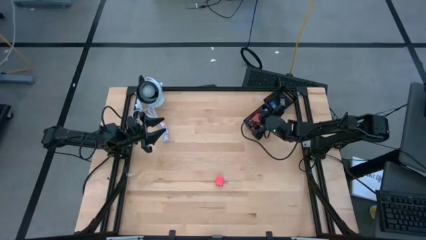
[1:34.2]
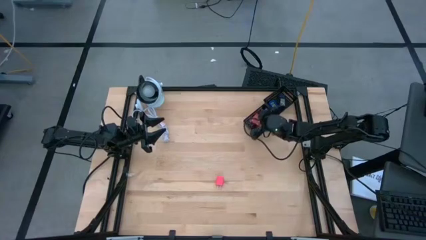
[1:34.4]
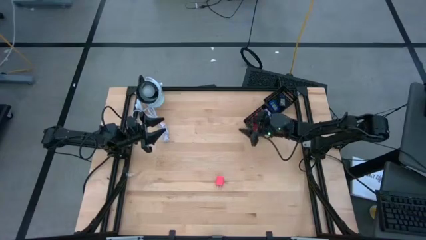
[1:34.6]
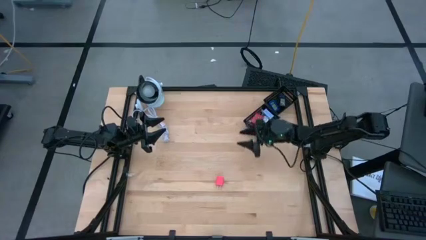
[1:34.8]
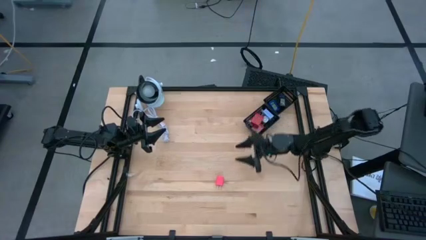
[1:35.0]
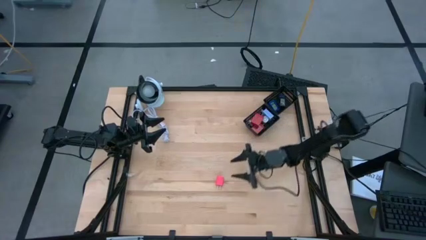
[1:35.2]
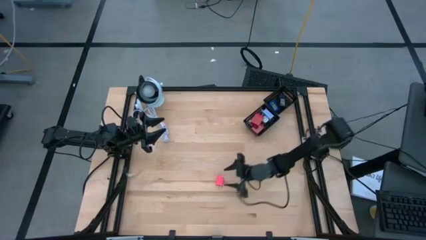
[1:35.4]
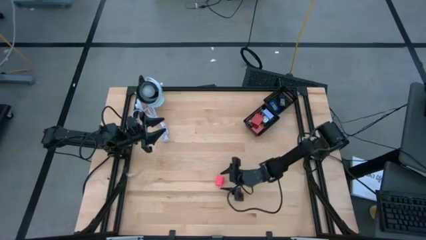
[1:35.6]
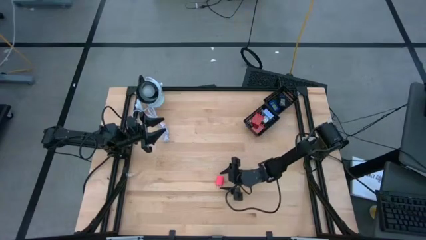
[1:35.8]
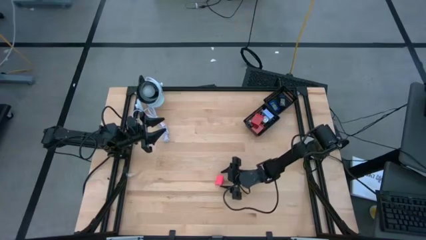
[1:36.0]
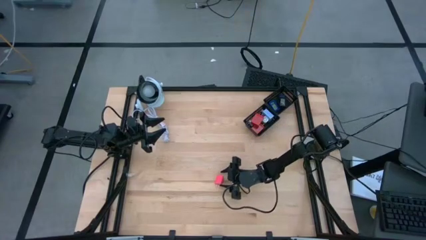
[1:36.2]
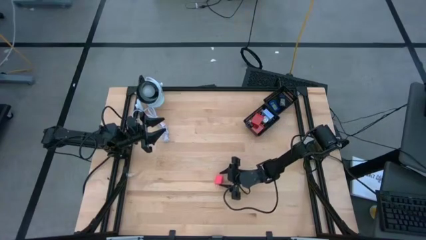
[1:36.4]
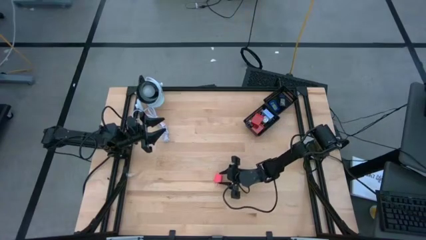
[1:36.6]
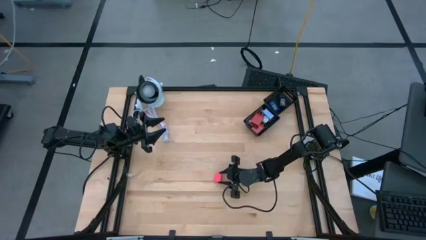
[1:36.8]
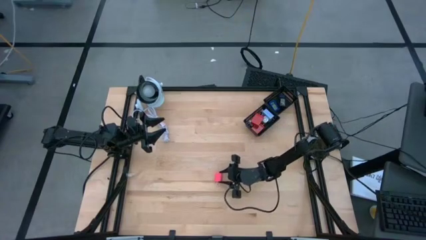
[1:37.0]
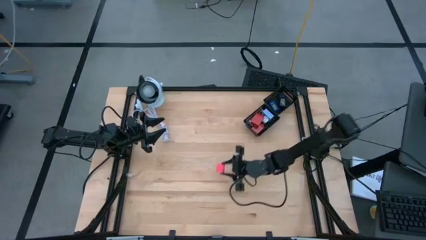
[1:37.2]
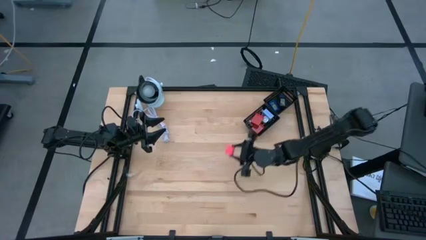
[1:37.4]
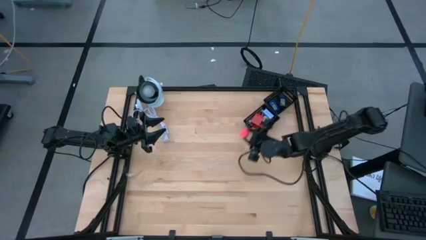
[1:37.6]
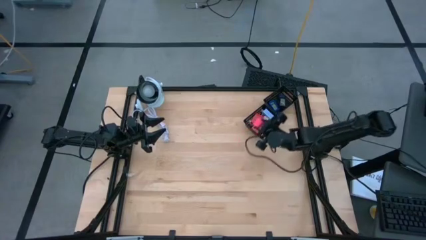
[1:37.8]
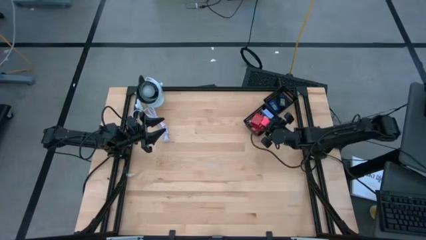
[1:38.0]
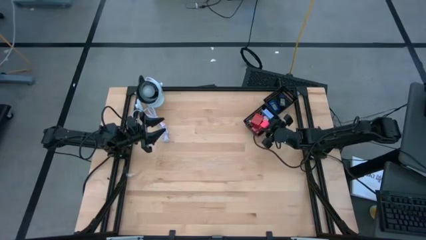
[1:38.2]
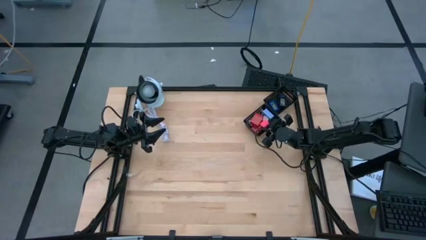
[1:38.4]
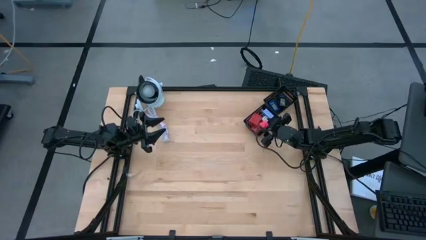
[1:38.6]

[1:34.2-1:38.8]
Task: Pick & Place Office items
Put the small pink charger adapter into the bottom black bin

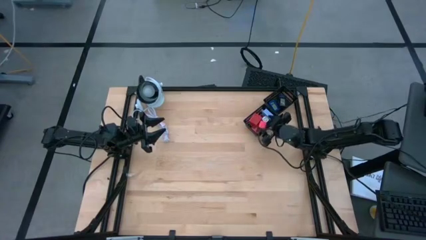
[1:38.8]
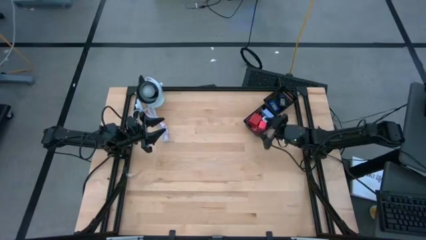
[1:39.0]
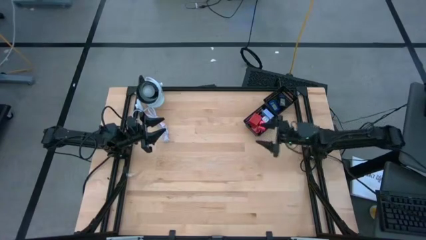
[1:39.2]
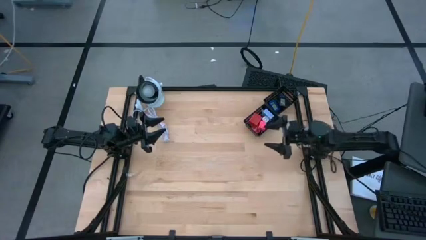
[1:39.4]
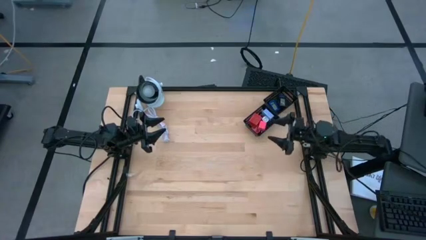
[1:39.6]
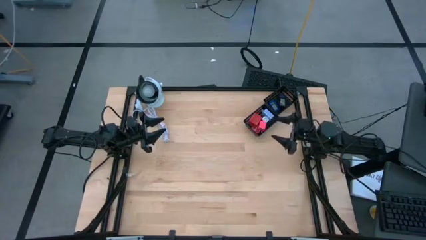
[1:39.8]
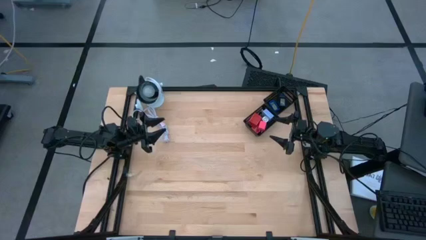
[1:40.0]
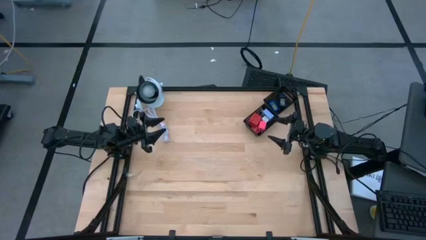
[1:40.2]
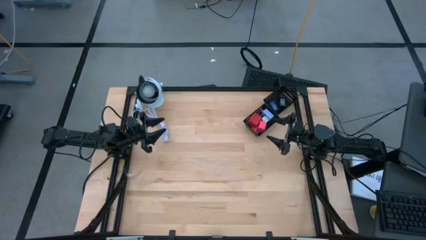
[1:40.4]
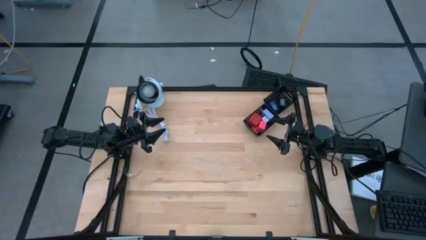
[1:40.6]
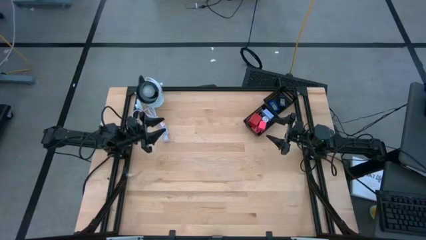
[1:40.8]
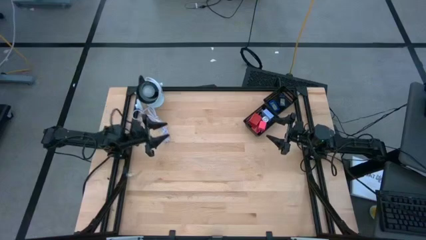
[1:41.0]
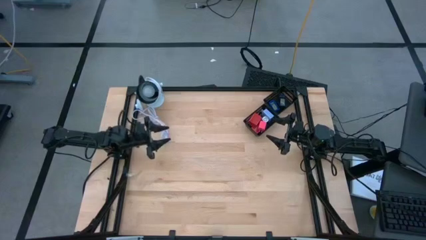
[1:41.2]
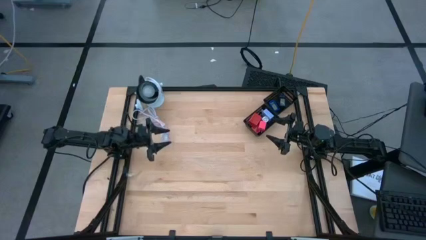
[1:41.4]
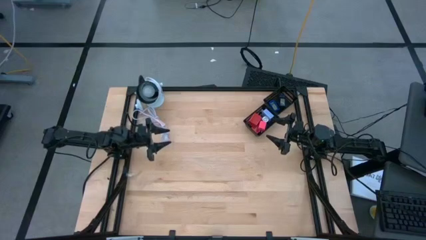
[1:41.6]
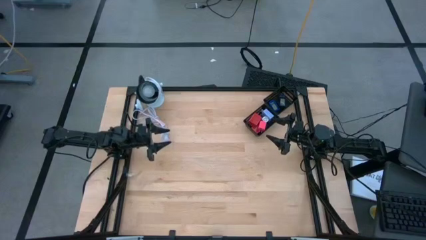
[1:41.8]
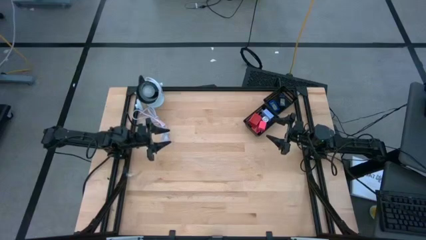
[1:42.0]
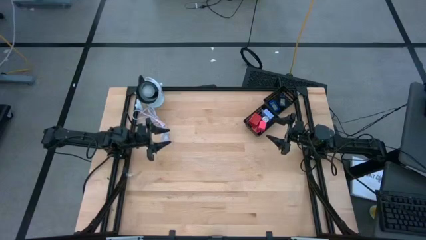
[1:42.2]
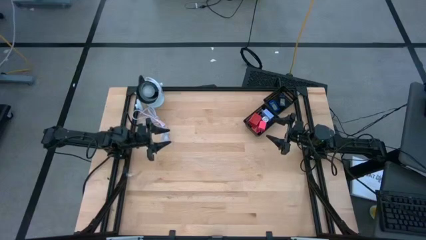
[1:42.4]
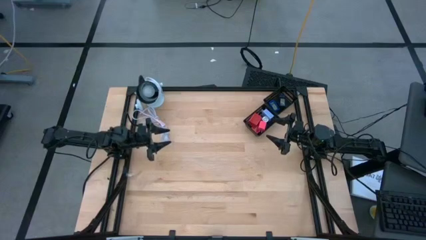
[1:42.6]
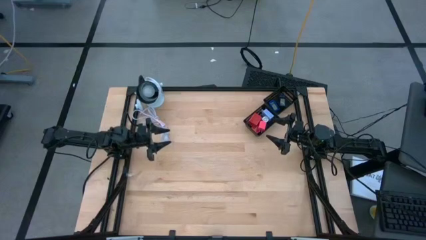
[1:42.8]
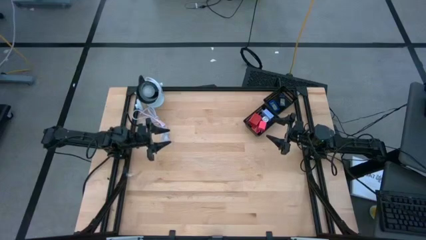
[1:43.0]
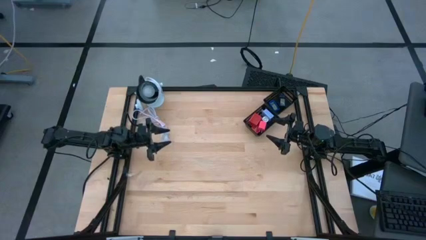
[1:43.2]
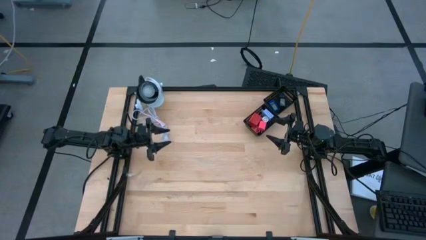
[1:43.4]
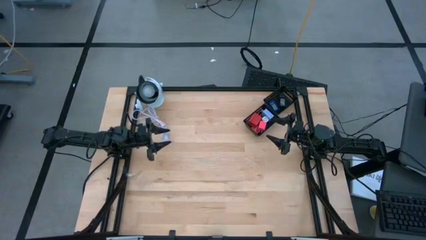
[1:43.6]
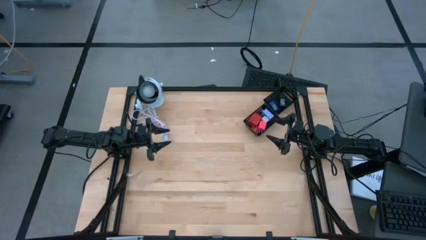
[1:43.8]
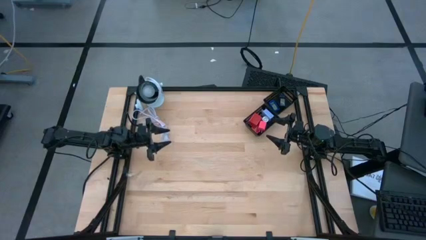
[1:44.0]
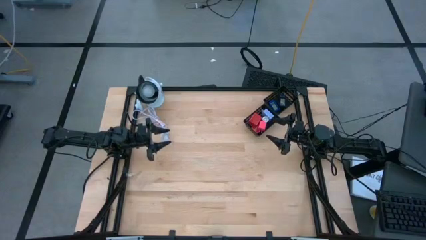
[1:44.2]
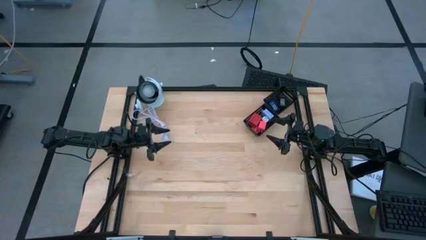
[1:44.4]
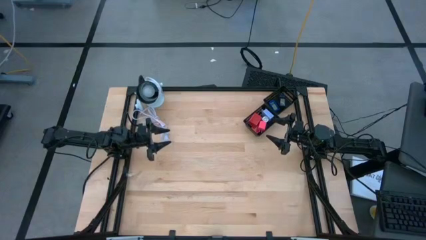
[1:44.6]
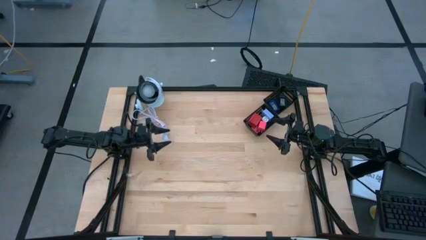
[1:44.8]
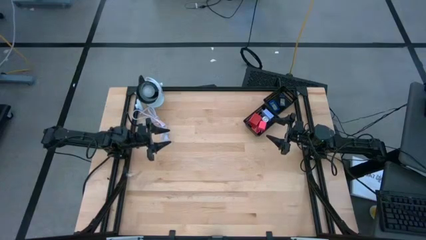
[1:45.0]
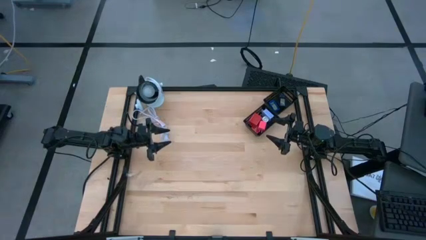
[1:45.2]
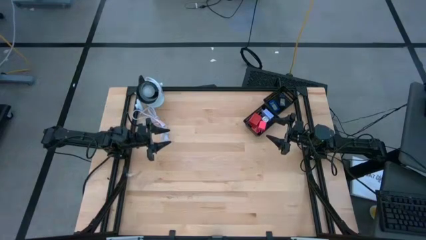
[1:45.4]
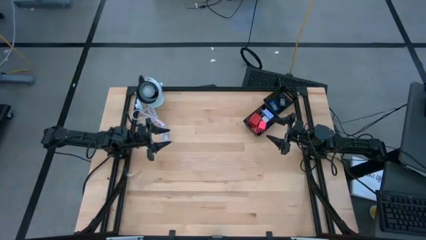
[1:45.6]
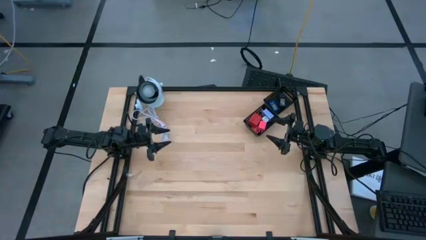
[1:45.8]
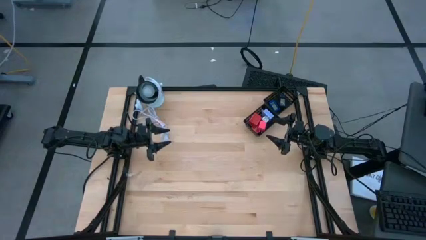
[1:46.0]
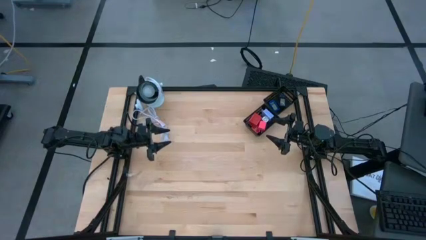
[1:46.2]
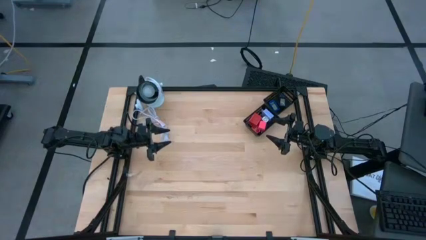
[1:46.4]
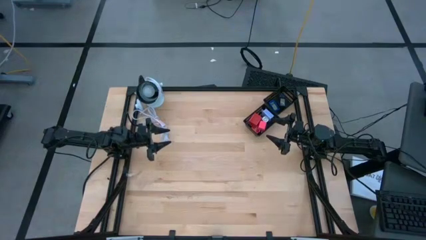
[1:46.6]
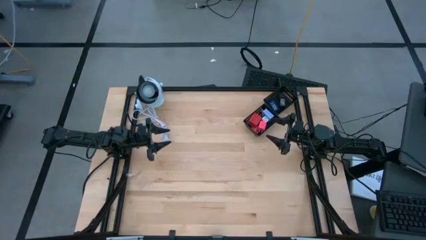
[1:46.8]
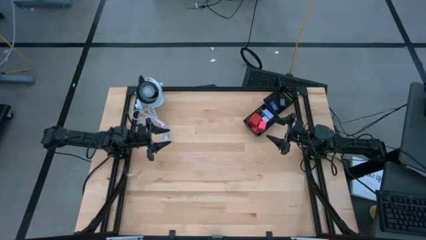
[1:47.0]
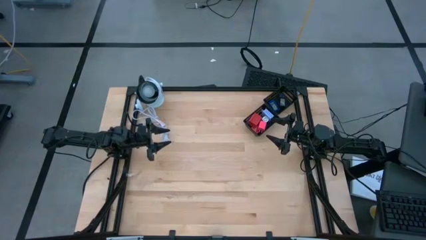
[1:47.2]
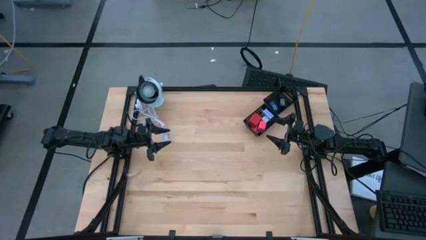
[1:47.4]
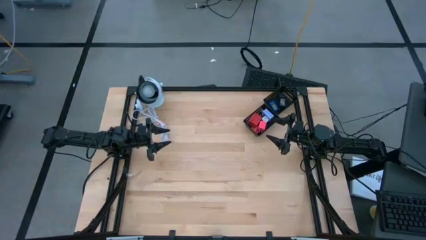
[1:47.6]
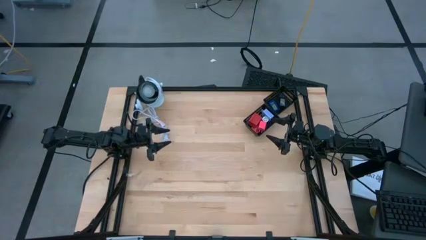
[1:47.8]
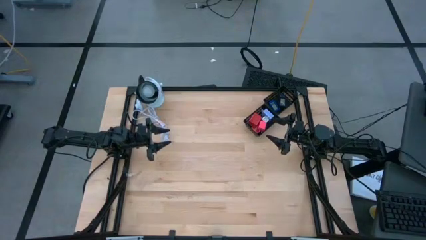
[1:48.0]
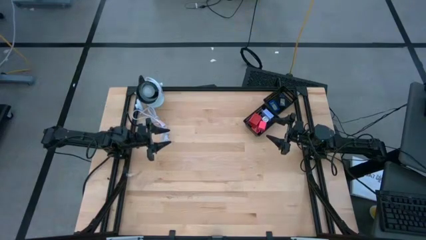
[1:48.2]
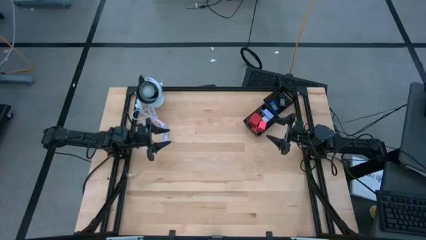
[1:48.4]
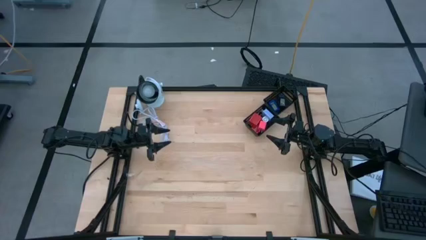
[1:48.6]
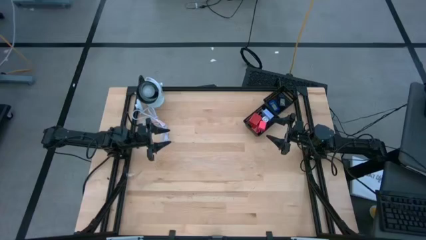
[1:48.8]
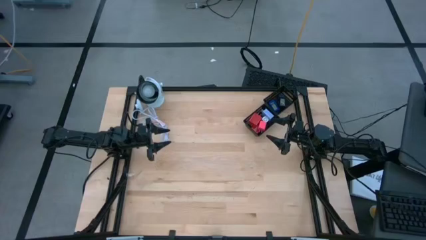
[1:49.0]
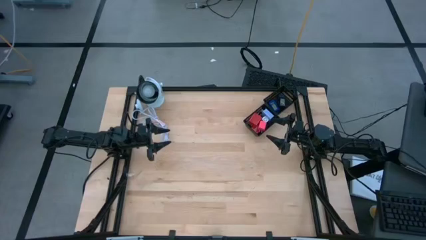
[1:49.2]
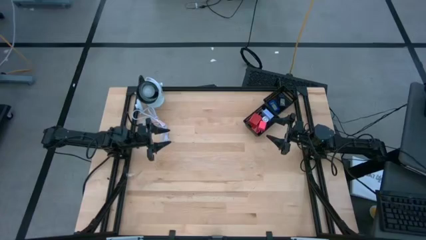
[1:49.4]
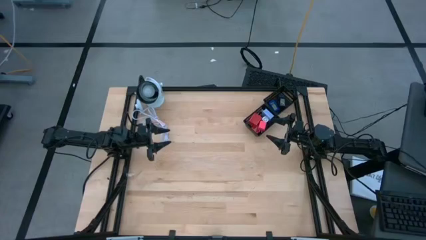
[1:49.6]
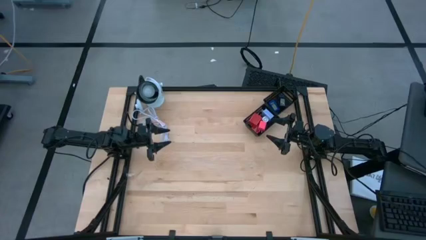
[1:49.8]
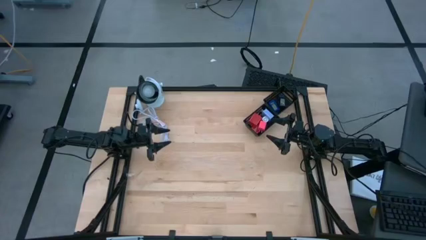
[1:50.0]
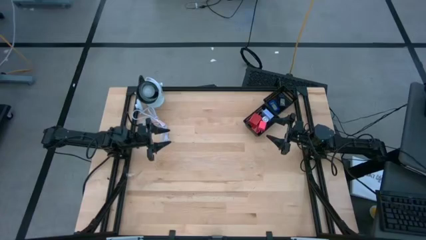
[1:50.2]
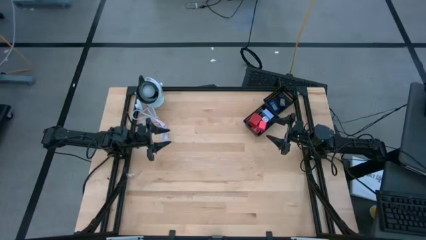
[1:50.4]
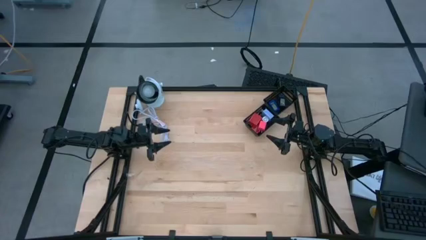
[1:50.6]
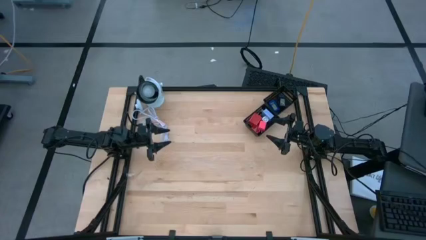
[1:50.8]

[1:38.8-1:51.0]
Return to Home Position
